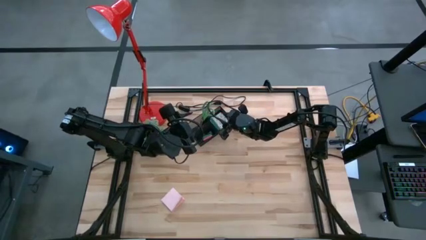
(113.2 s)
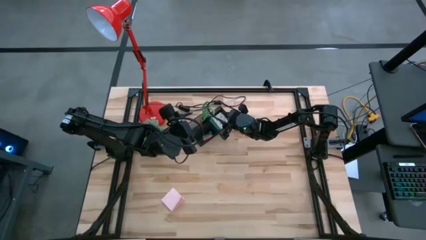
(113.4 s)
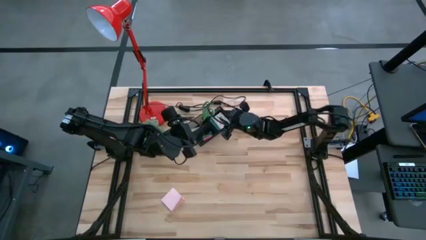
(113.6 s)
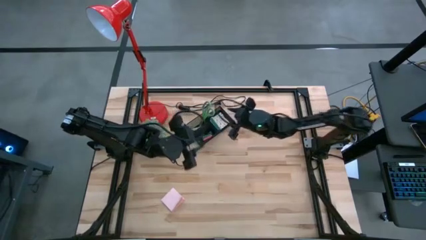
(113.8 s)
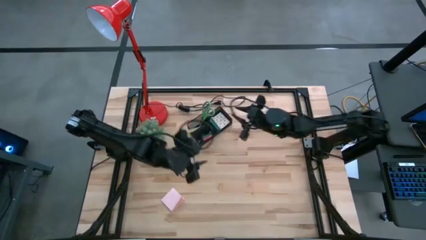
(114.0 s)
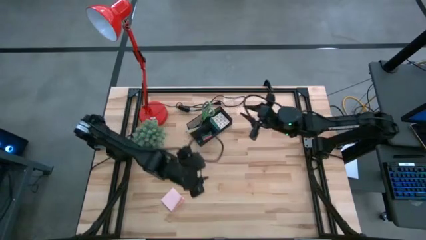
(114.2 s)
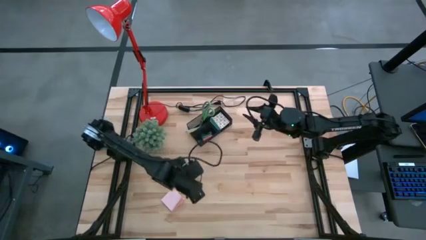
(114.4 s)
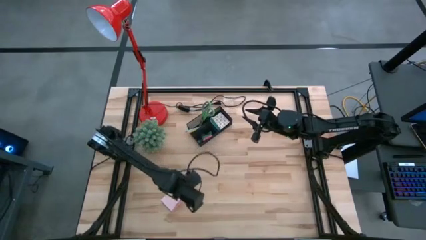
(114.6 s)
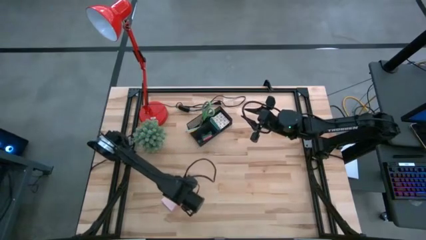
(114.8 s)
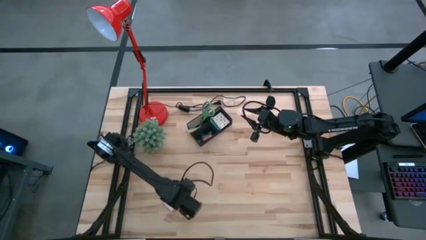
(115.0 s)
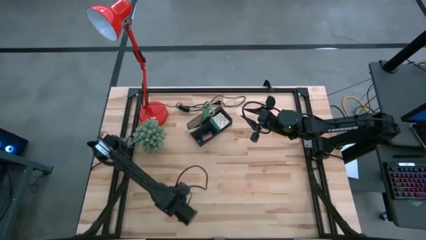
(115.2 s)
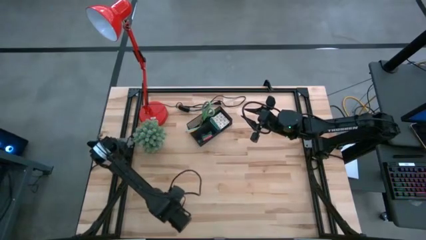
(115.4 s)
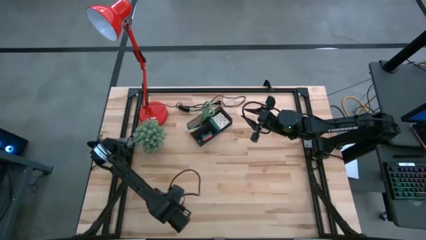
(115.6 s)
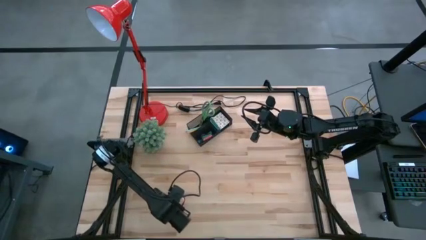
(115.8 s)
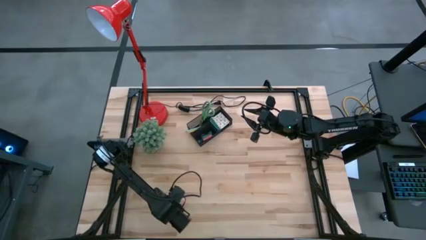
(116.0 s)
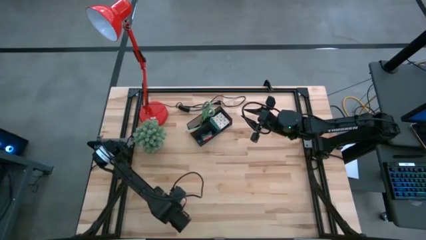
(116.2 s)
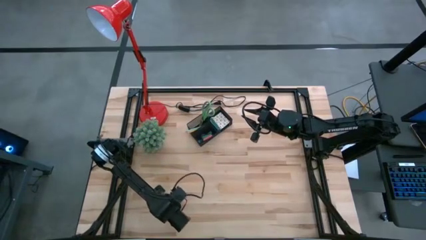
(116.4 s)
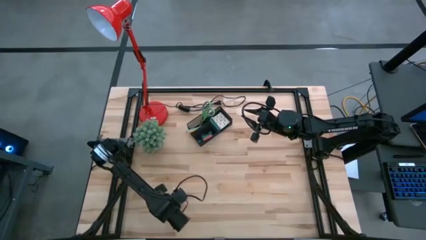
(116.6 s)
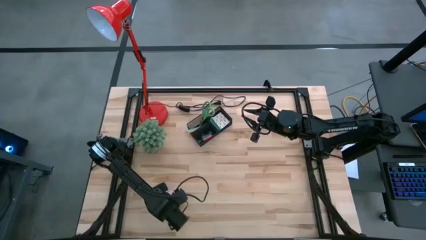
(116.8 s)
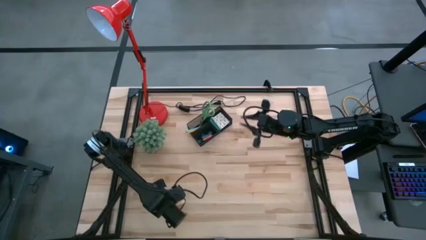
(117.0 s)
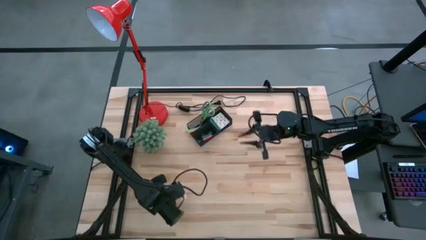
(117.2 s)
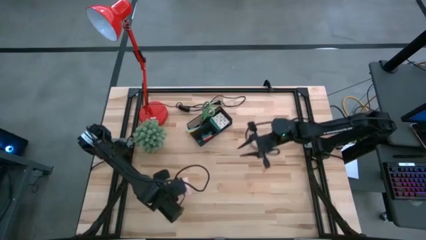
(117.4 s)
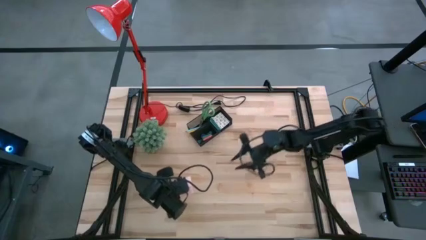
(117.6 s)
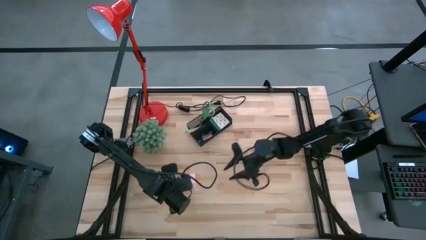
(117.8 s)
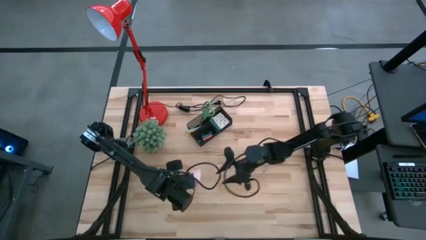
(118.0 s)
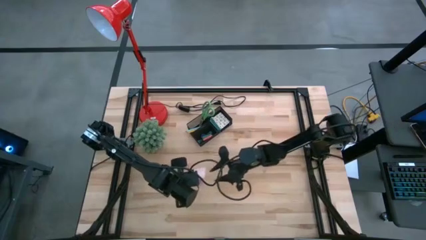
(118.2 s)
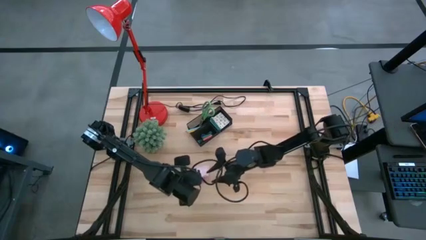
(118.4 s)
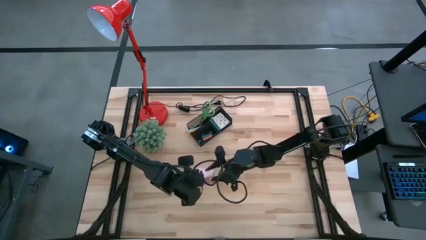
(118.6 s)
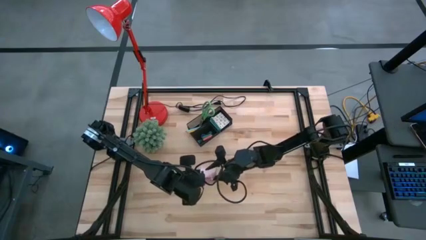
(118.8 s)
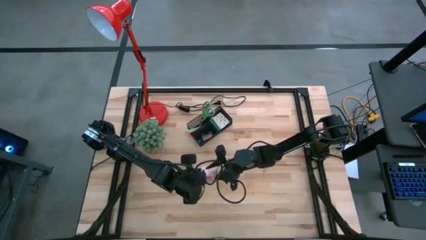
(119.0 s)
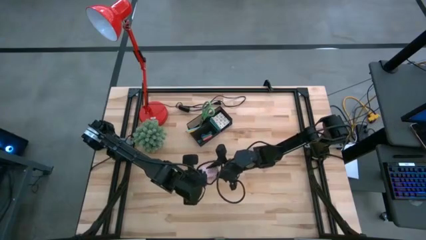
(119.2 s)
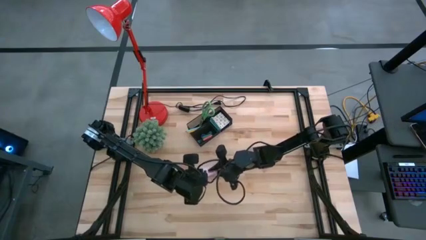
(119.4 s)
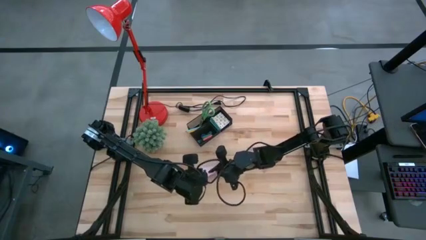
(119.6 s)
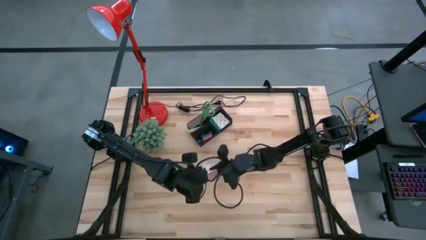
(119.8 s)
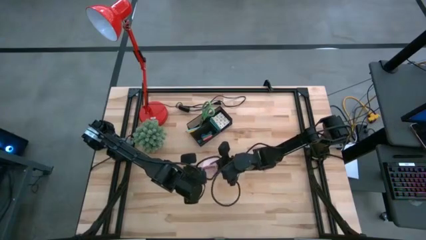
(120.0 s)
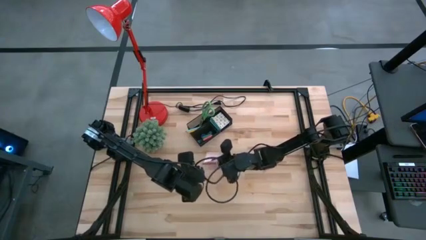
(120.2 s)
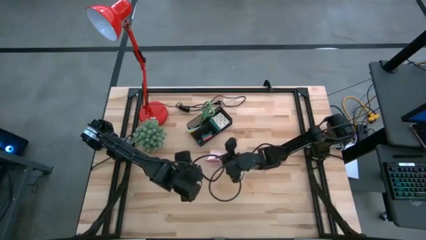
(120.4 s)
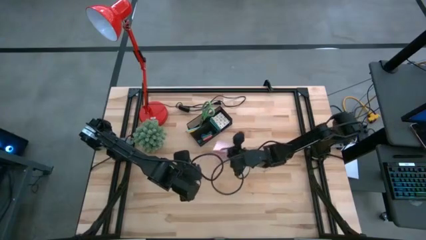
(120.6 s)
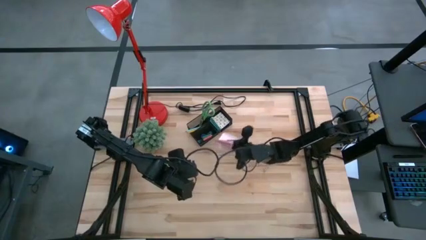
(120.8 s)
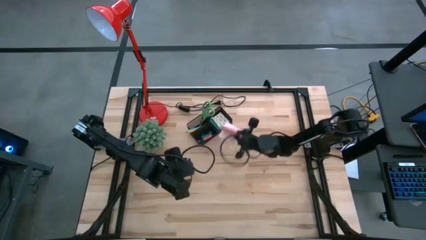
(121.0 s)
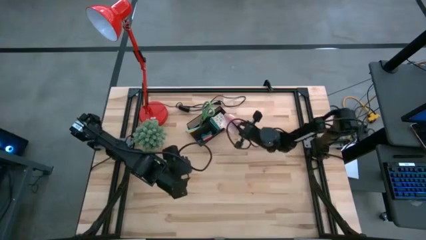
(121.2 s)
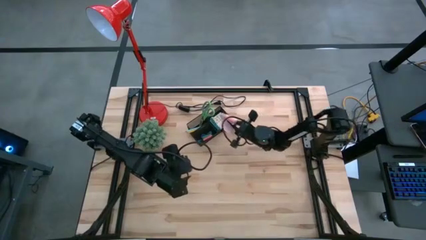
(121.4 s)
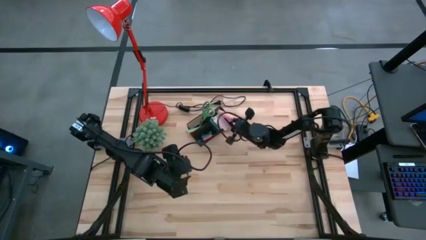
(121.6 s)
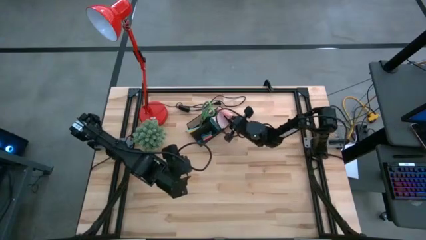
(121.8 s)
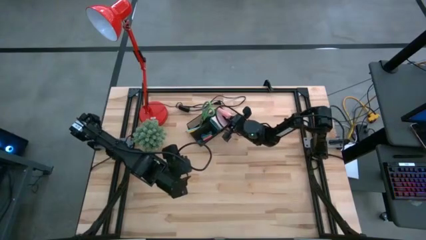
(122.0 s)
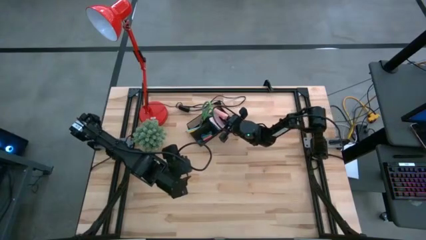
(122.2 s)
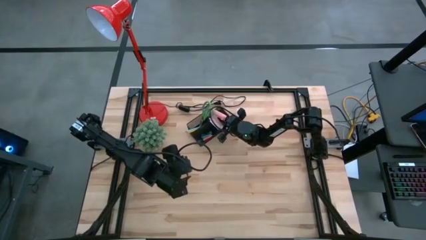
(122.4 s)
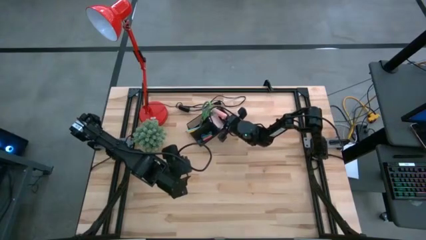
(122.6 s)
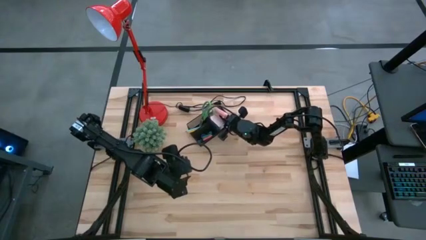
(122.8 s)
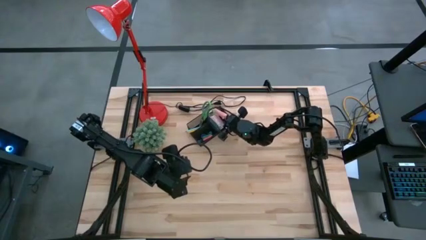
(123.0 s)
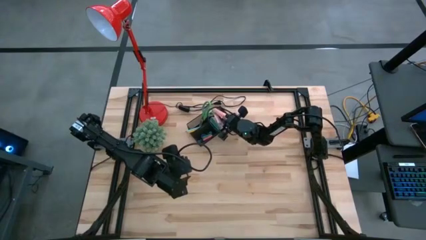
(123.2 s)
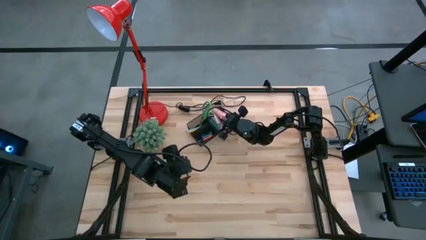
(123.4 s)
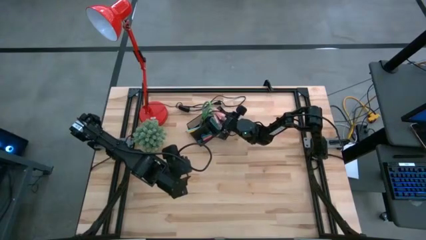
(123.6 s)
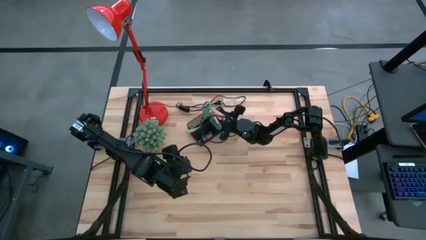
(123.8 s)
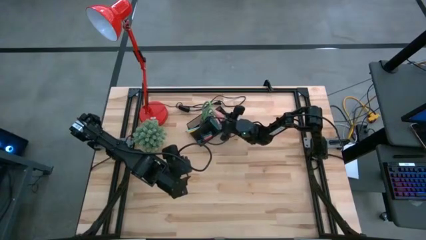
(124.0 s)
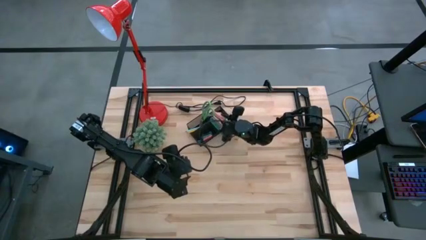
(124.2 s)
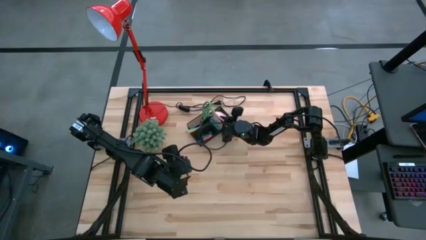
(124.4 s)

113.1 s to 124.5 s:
Task: Pick and place office supplies into organizer
Put the light pink sticky notes into the black desk organizer
